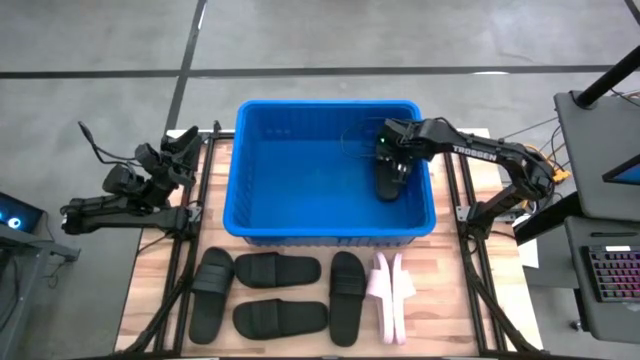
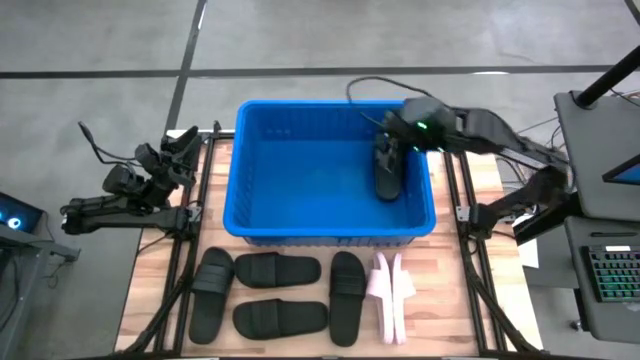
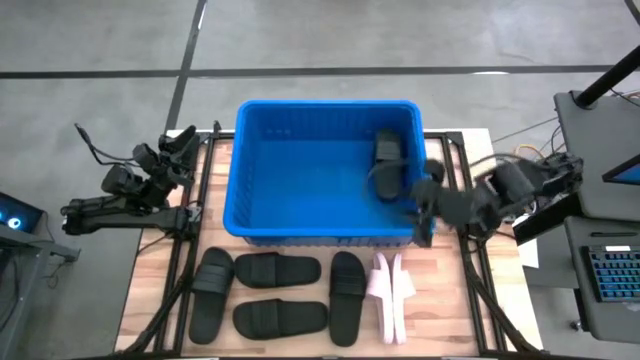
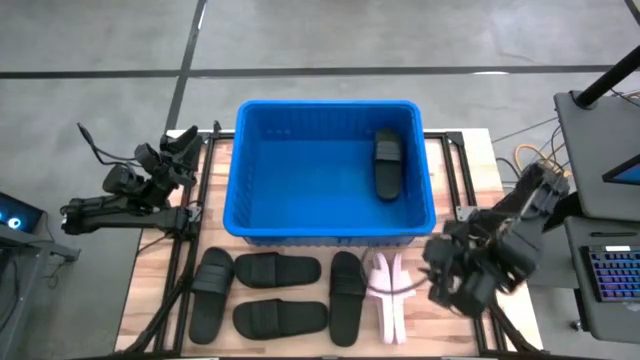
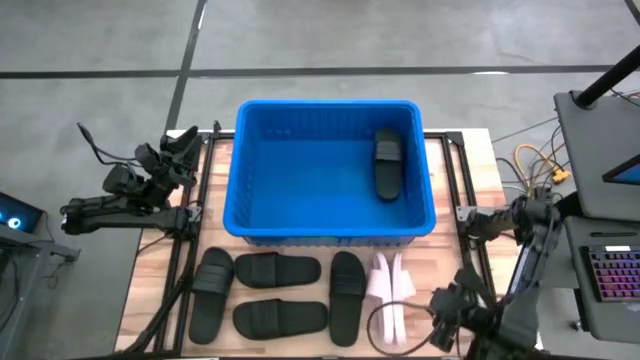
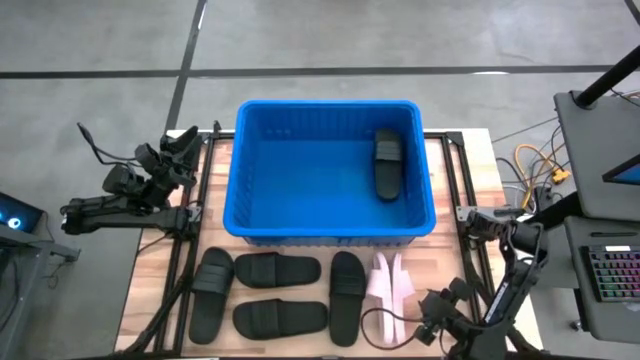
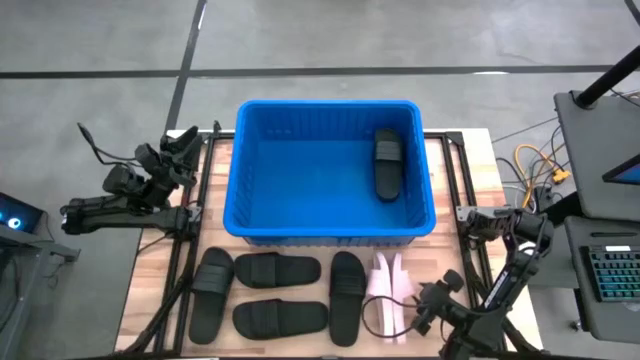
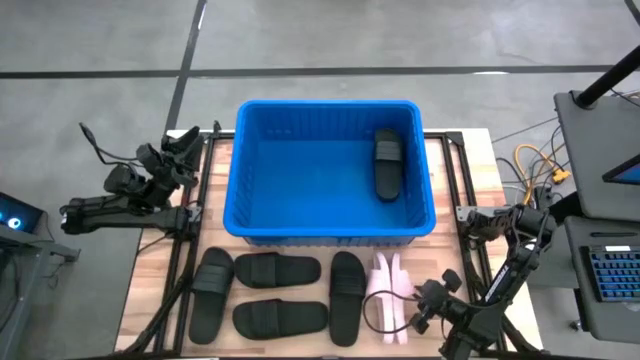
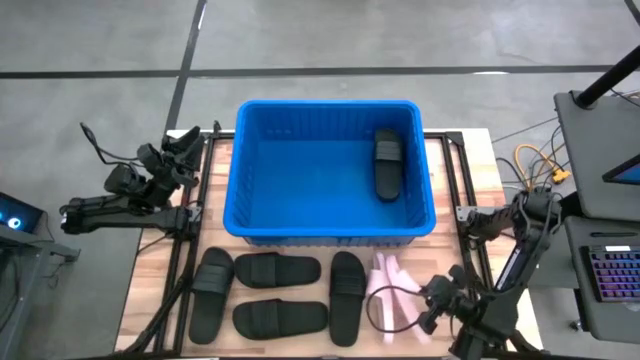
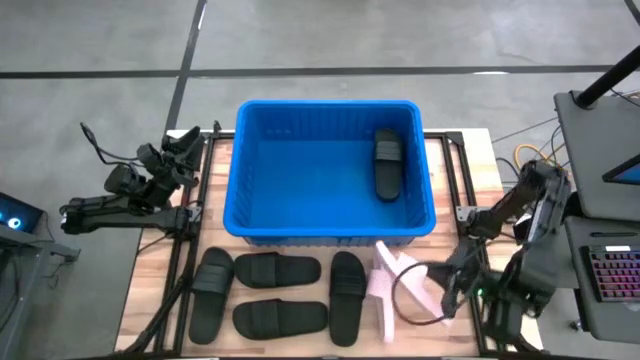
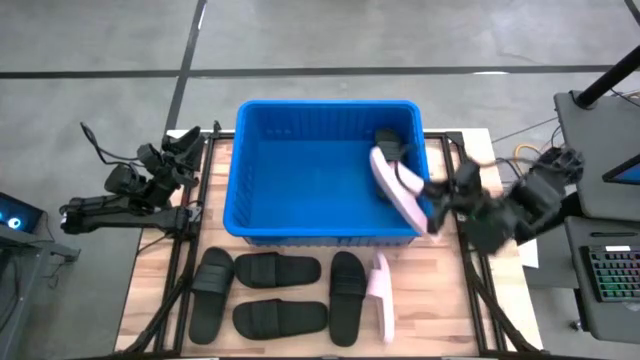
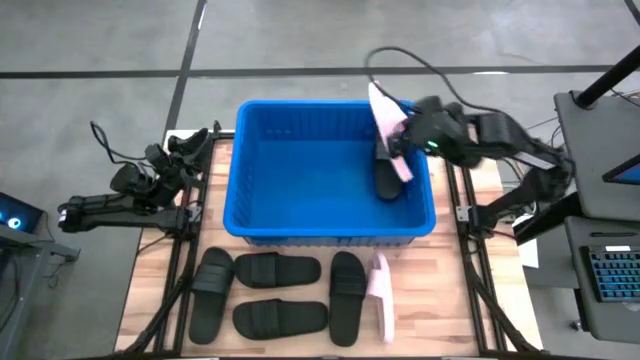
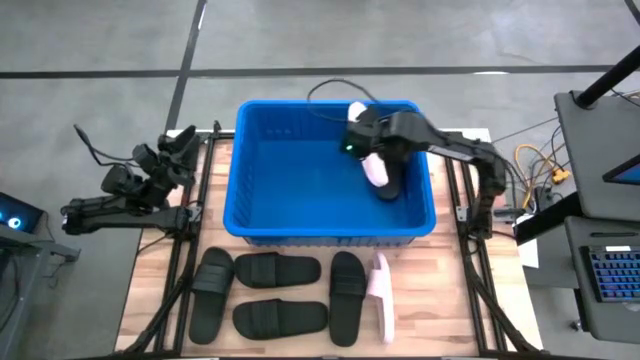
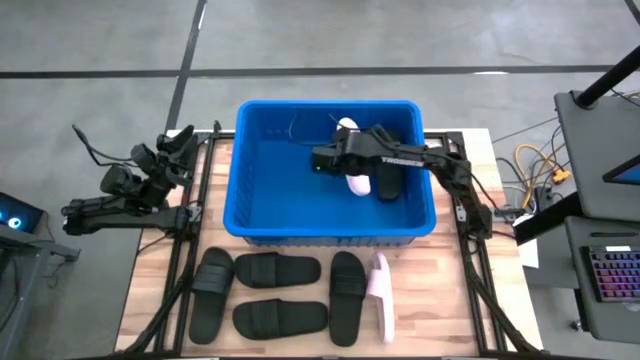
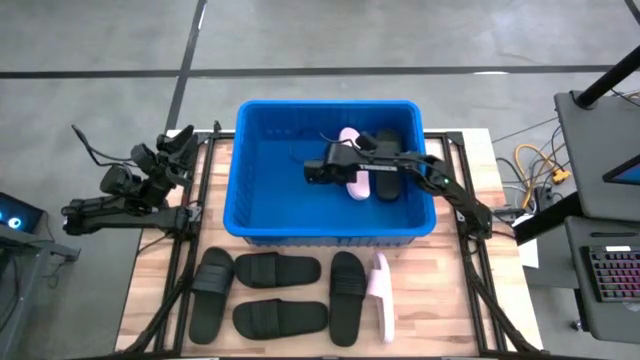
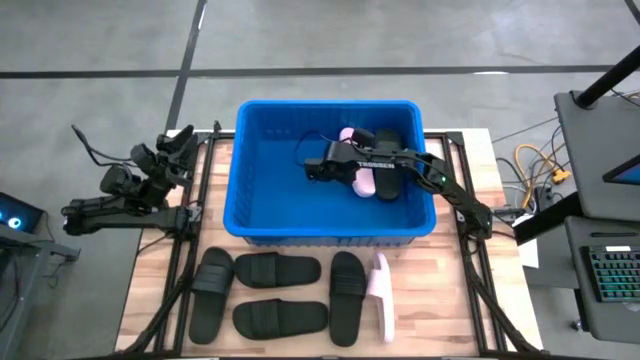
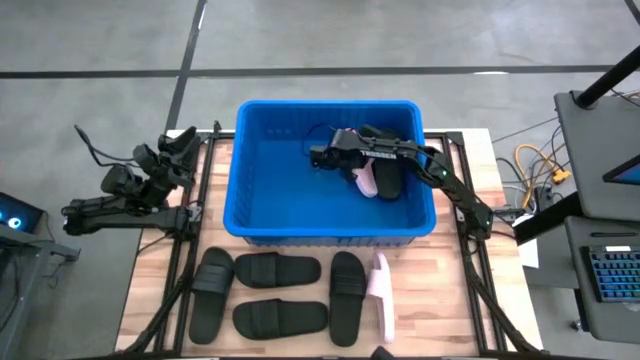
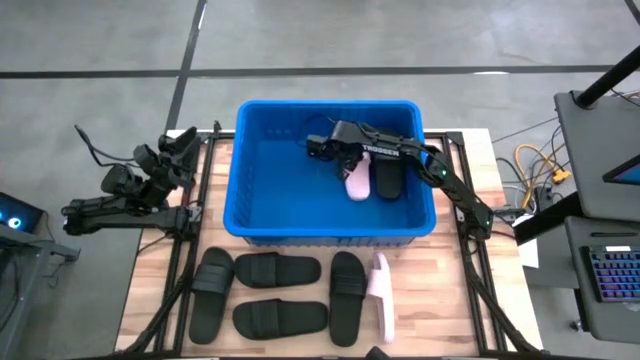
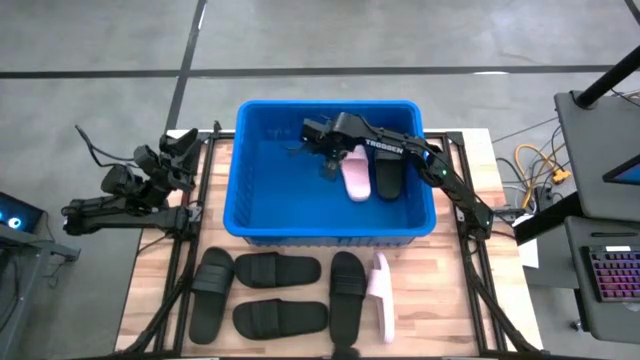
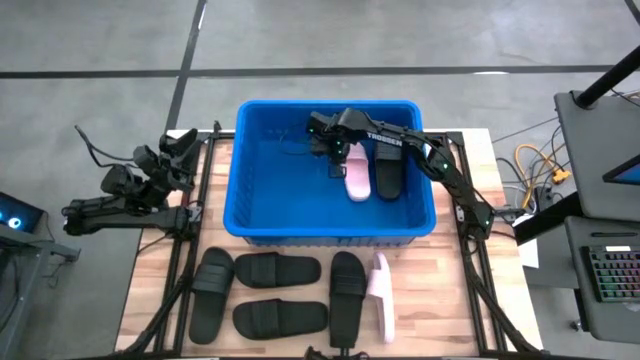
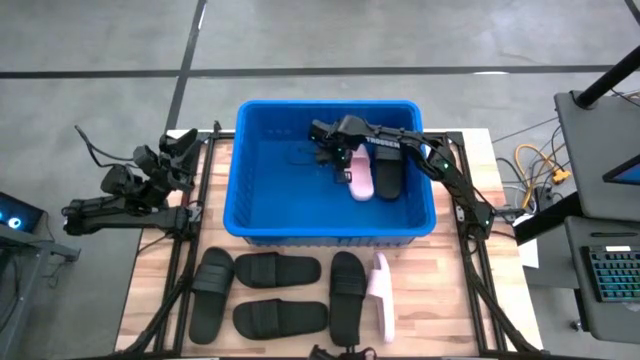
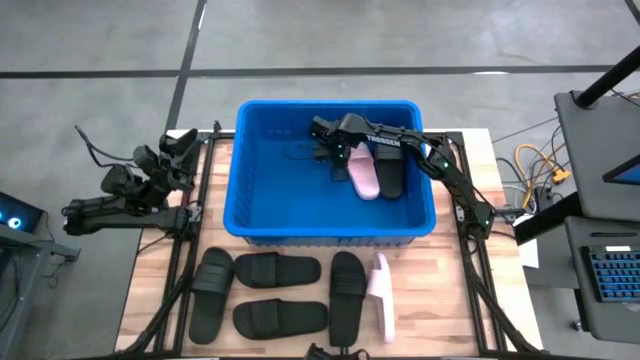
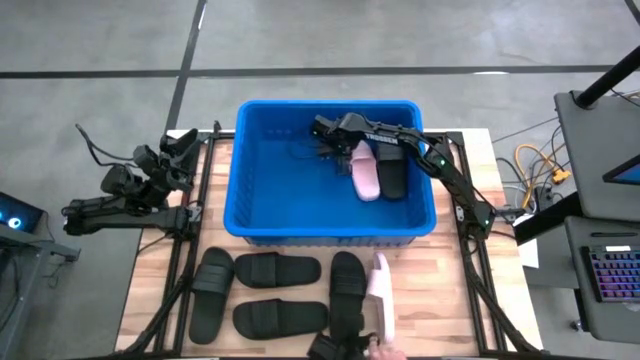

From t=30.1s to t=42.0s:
Task: Pick and place slides into bin
Put the pink slide into the blue bin

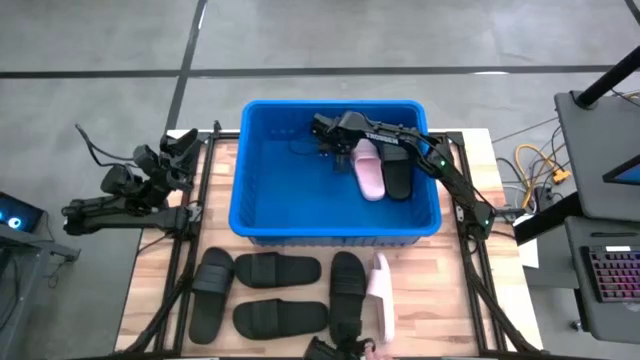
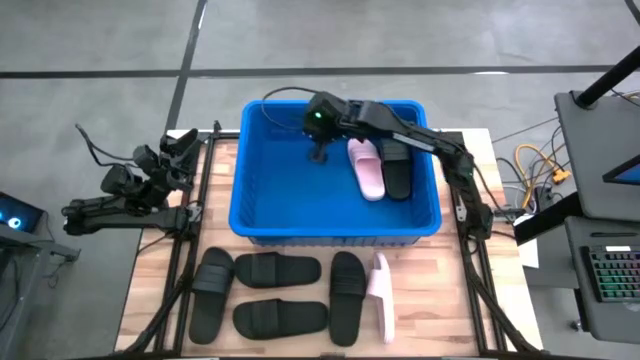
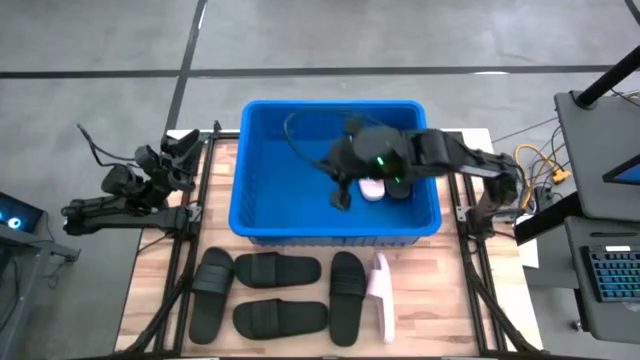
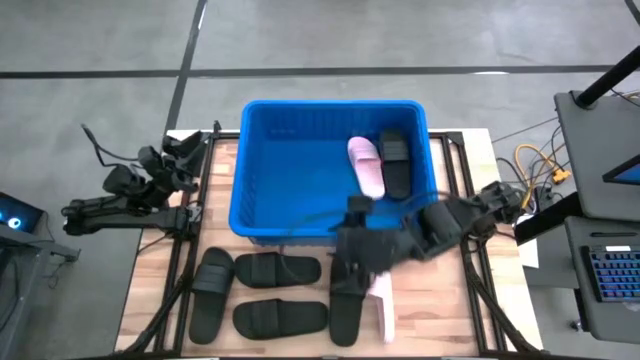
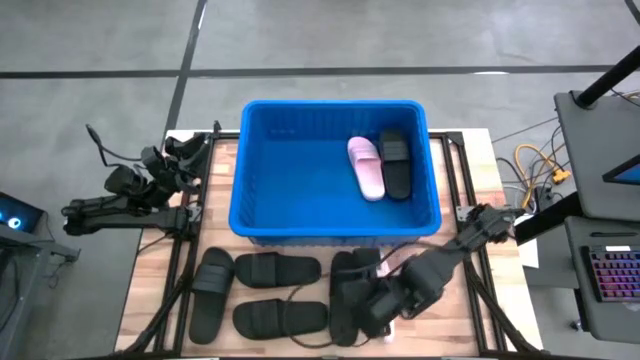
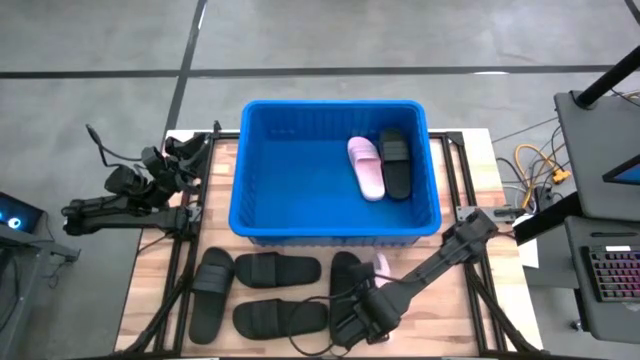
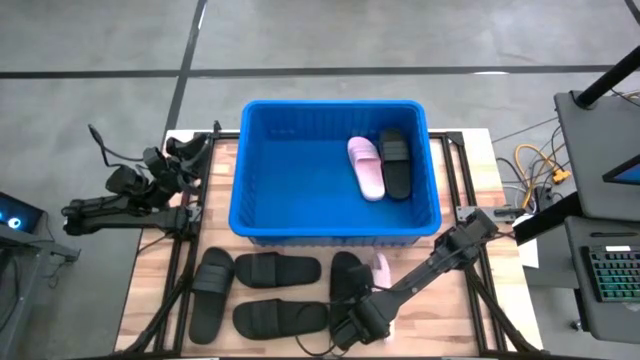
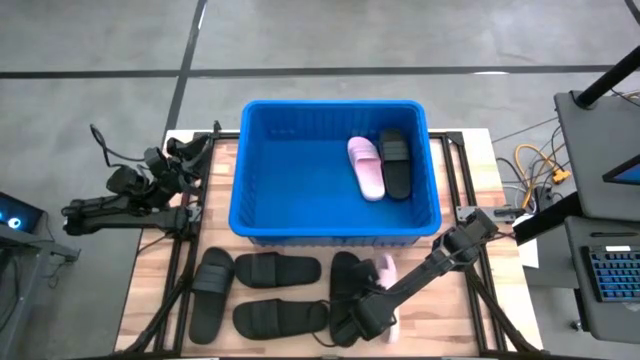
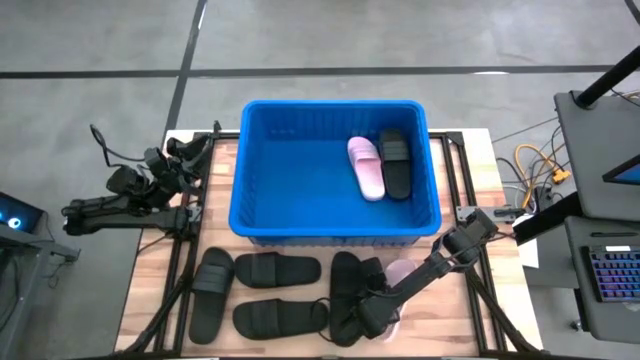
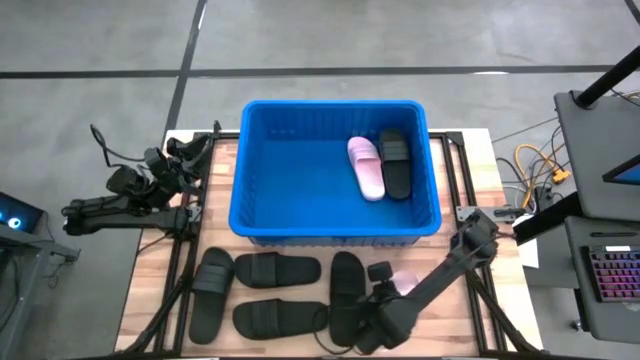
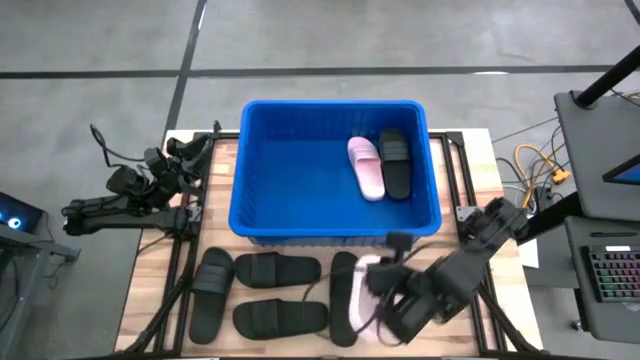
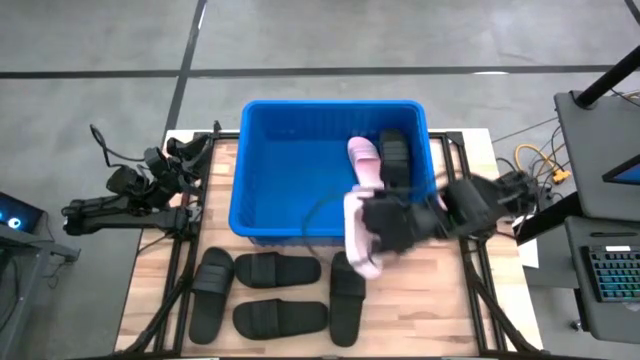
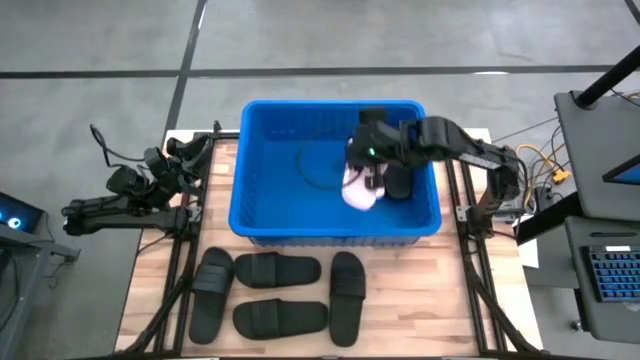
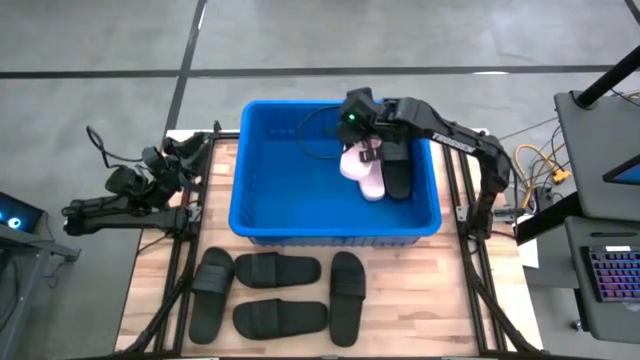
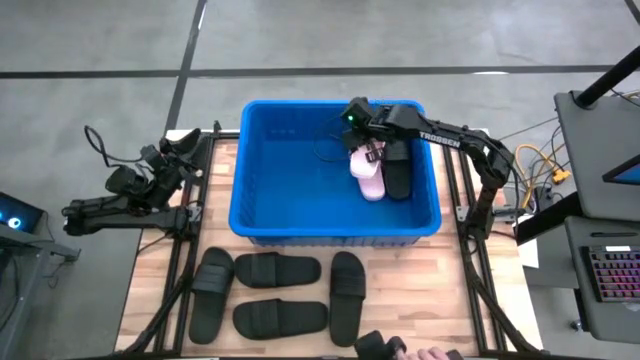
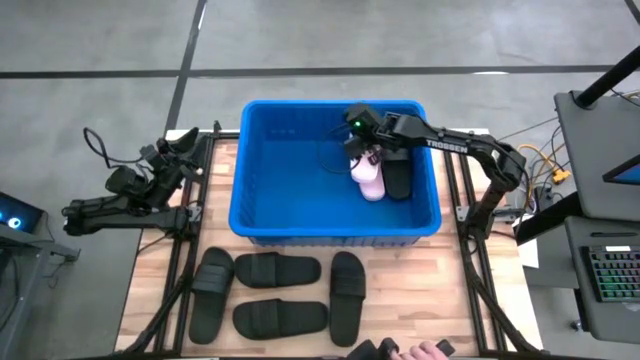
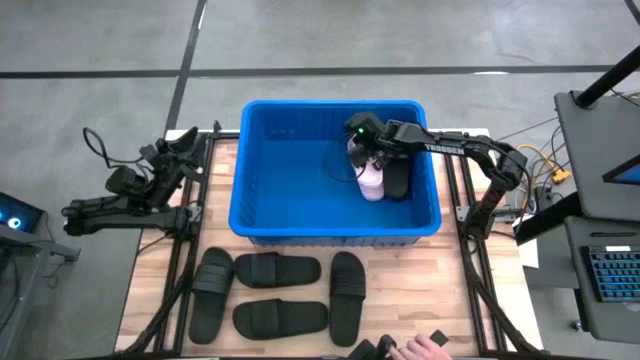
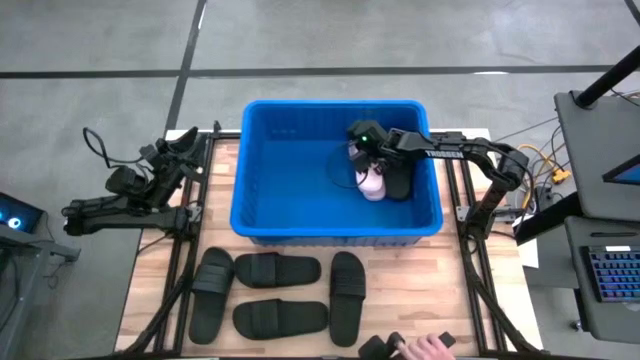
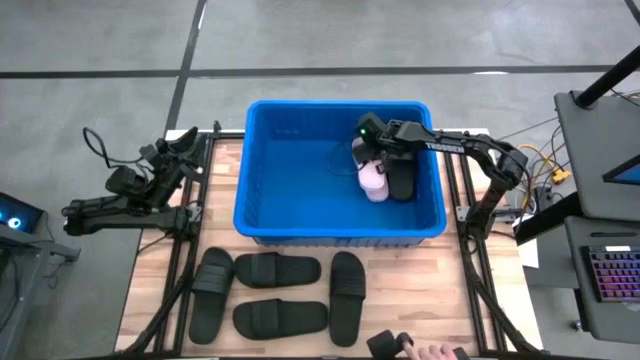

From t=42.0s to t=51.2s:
Put the pink slide into the blue bin

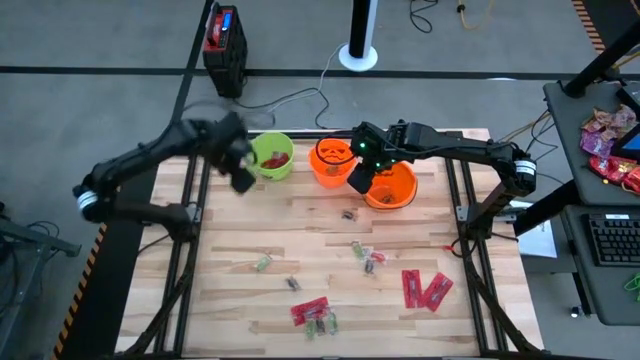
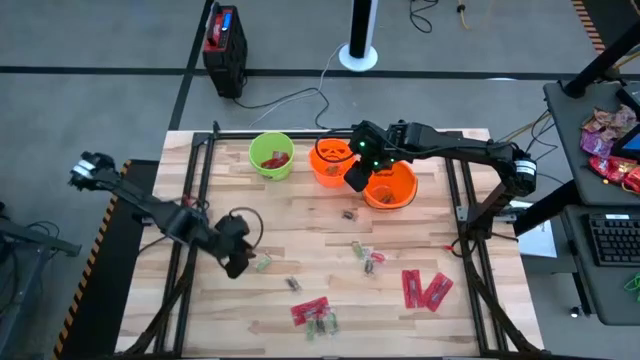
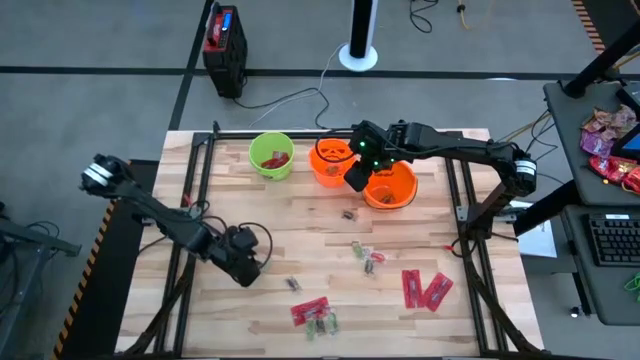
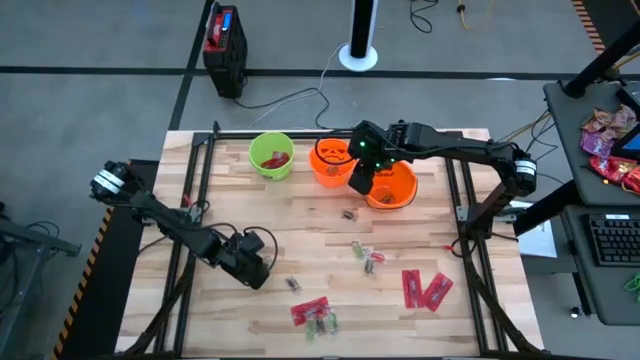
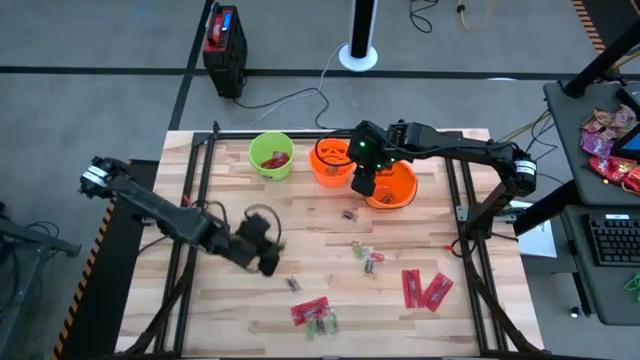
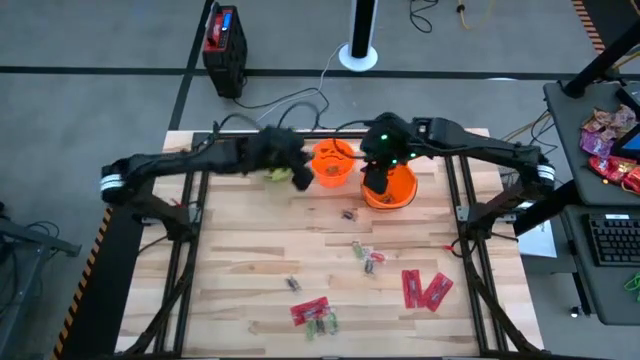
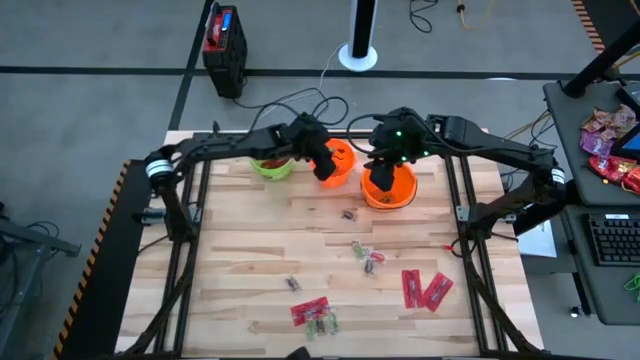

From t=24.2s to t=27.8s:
Task: Sort candy by brand, put in halloween buckets
Put the green gummy into the left orange bucket
